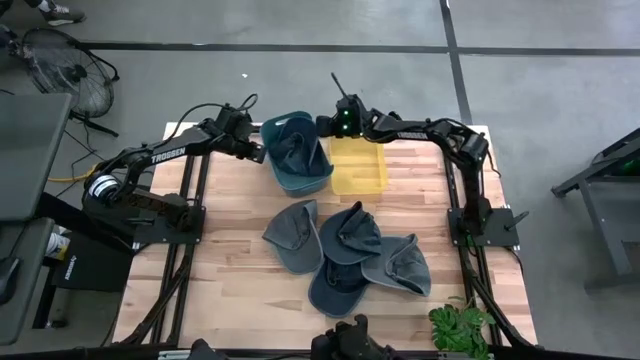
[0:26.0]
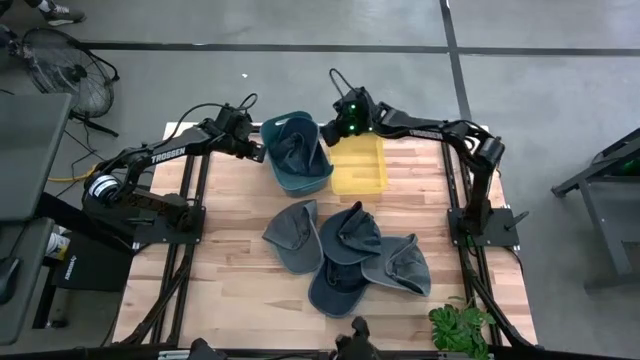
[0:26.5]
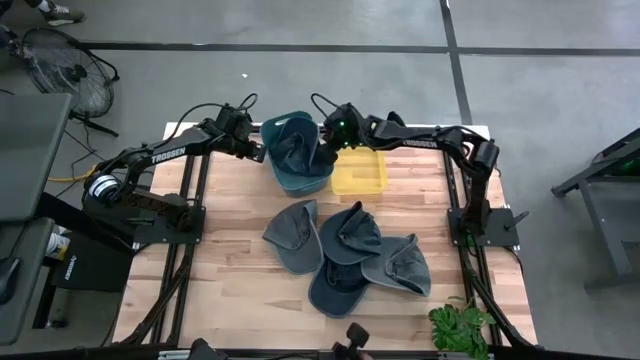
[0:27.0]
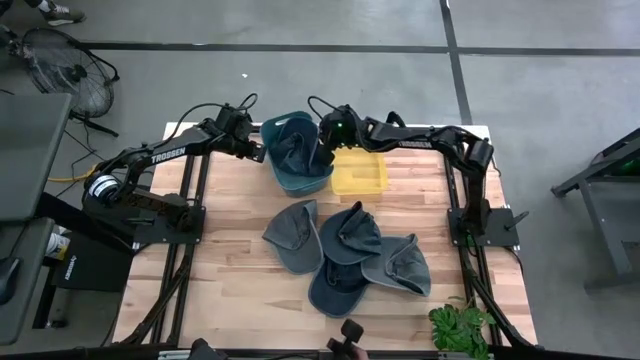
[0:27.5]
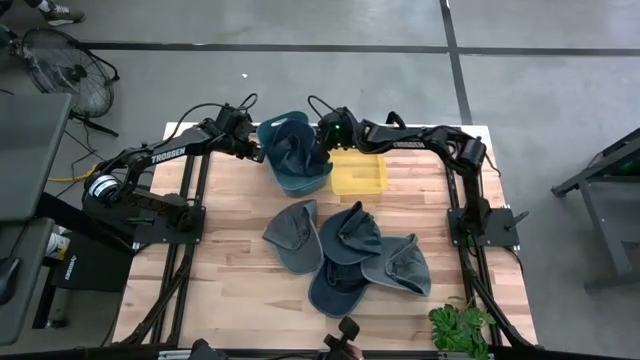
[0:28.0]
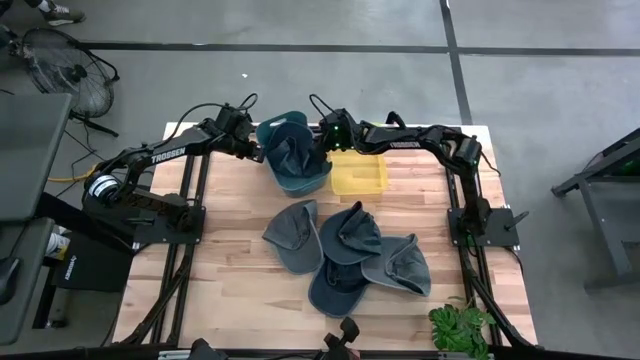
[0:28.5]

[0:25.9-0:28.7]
Task: Pick & Place hat
Adjust the blue cap in the blue bin

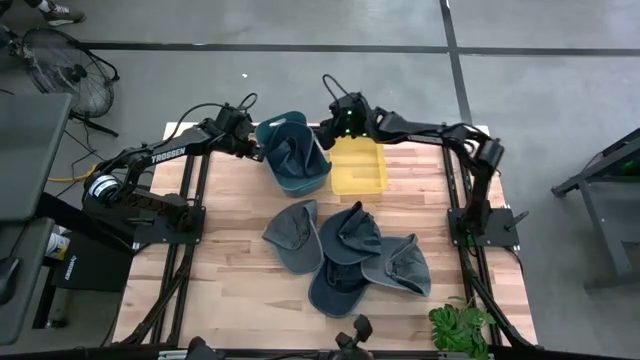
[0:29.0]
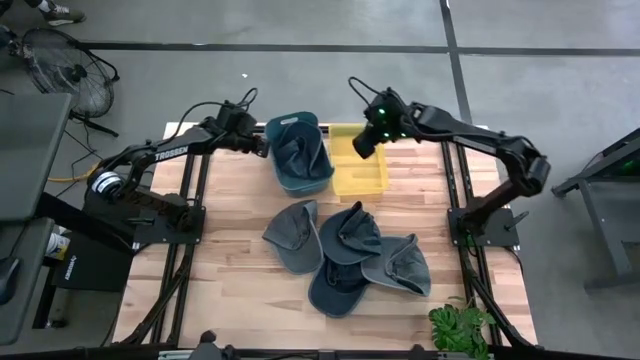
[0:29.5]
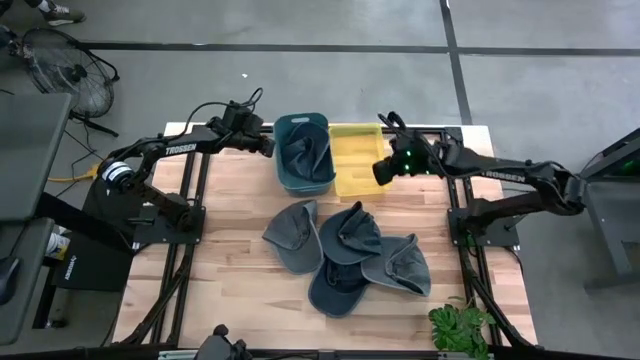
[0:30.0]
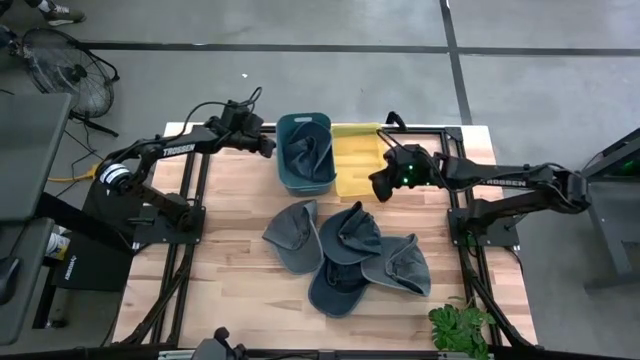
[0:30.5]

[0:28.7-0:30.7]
Adjust the blue bin on the table

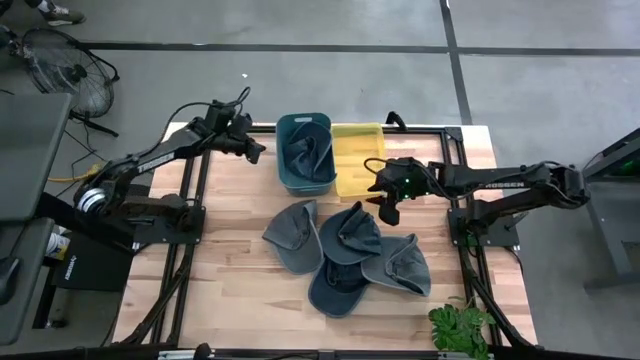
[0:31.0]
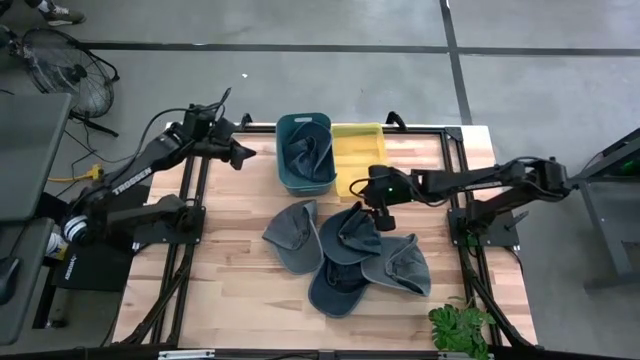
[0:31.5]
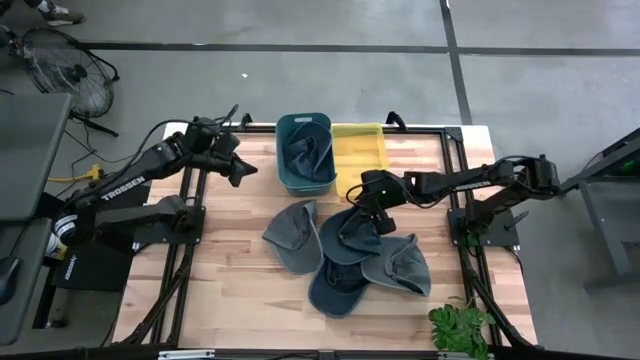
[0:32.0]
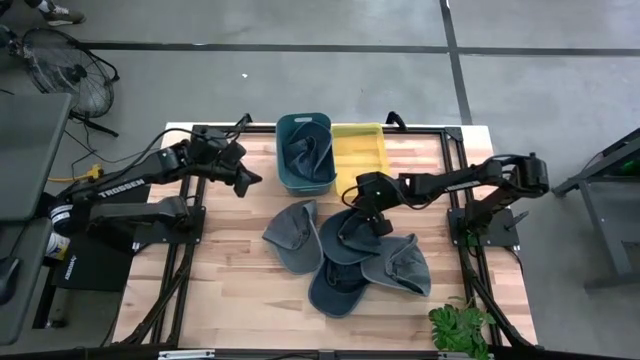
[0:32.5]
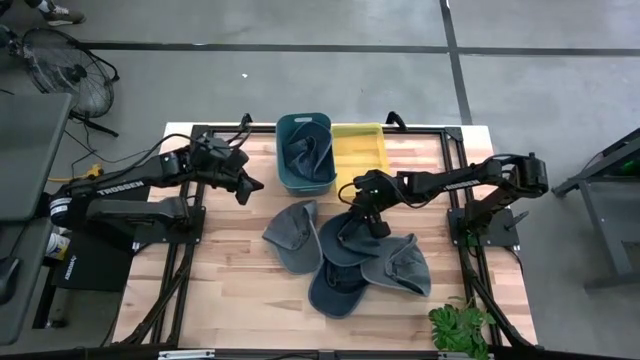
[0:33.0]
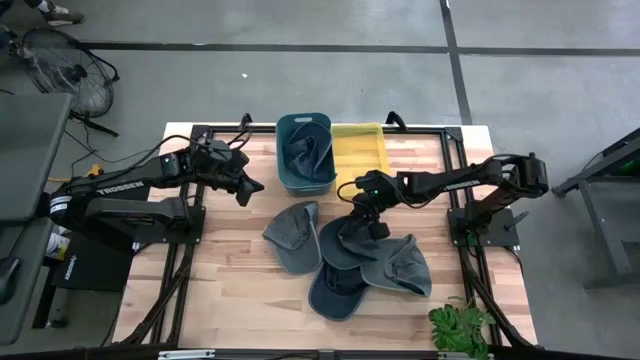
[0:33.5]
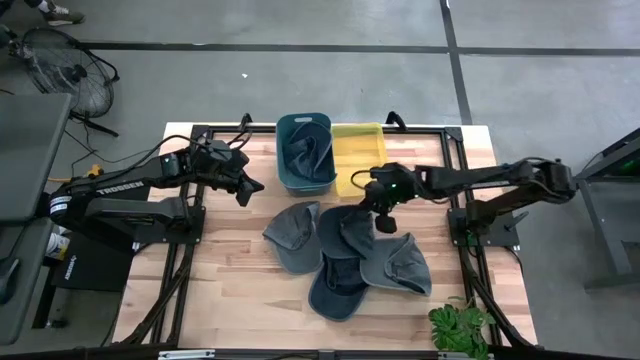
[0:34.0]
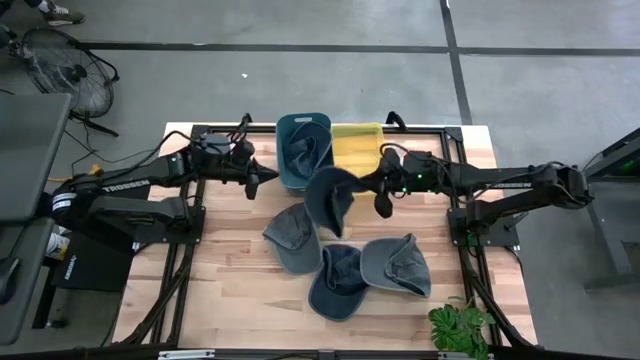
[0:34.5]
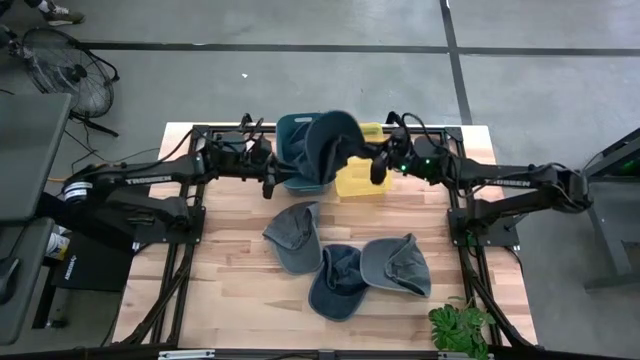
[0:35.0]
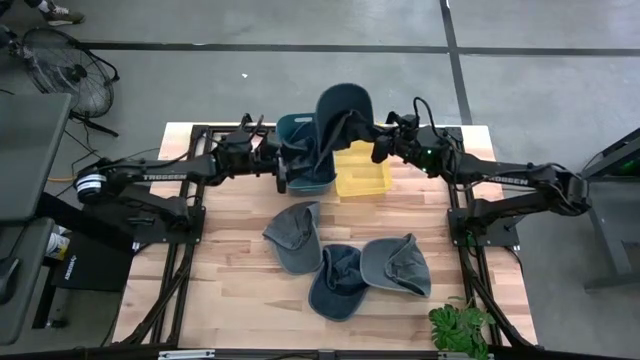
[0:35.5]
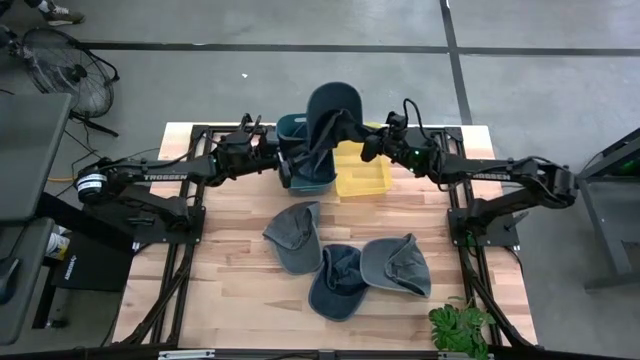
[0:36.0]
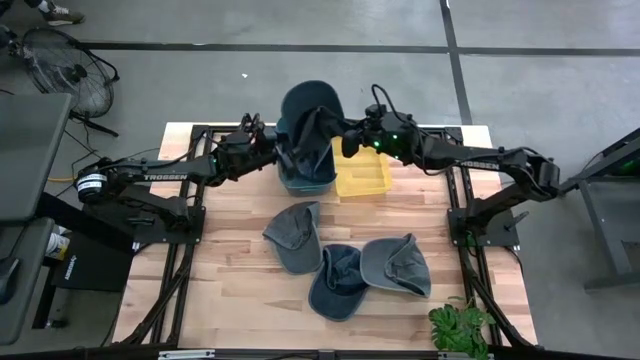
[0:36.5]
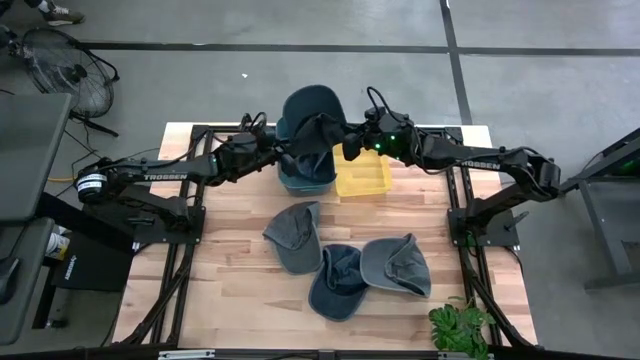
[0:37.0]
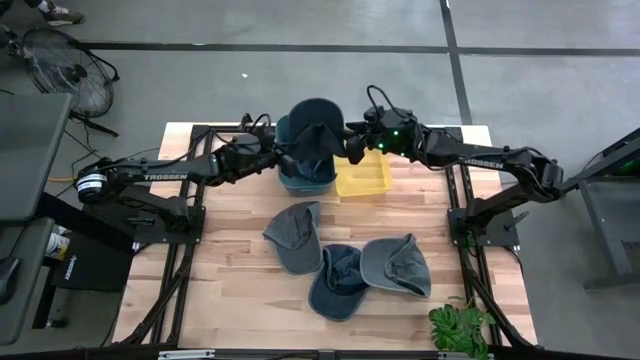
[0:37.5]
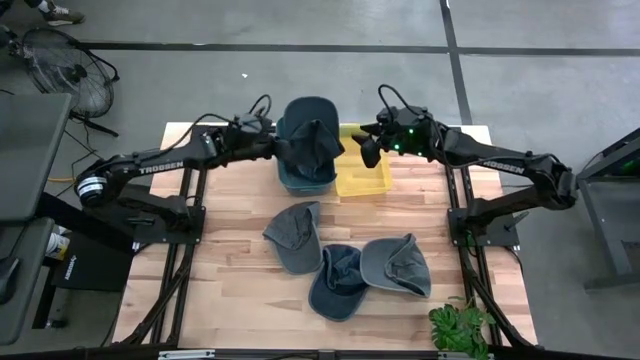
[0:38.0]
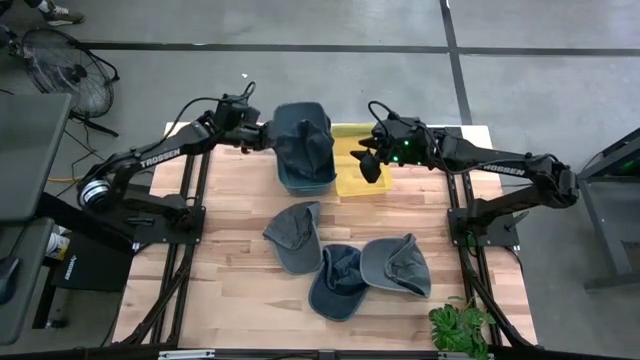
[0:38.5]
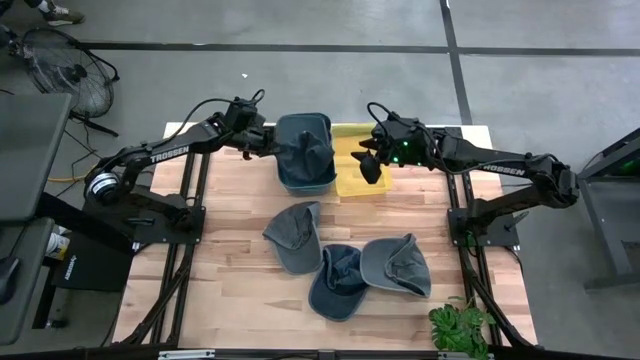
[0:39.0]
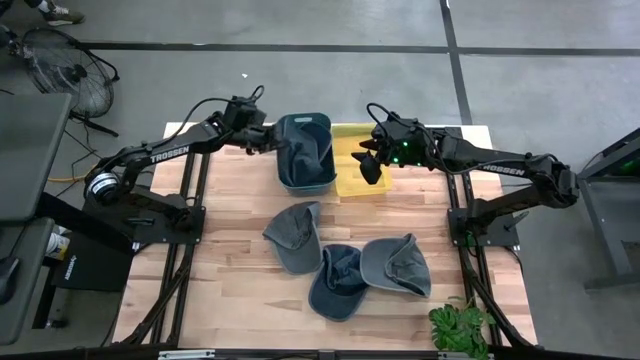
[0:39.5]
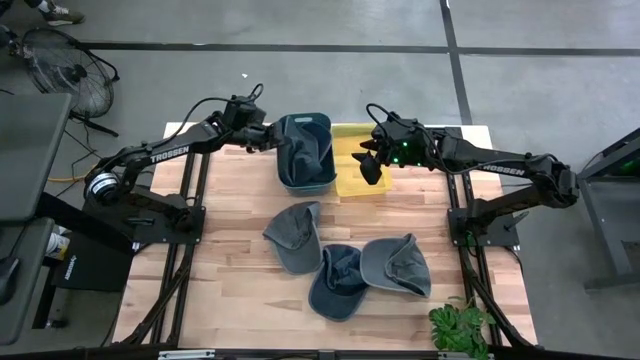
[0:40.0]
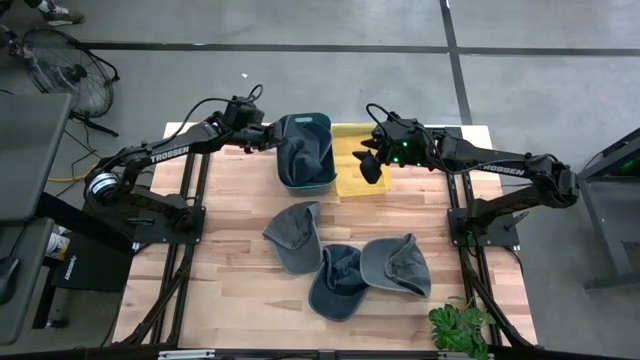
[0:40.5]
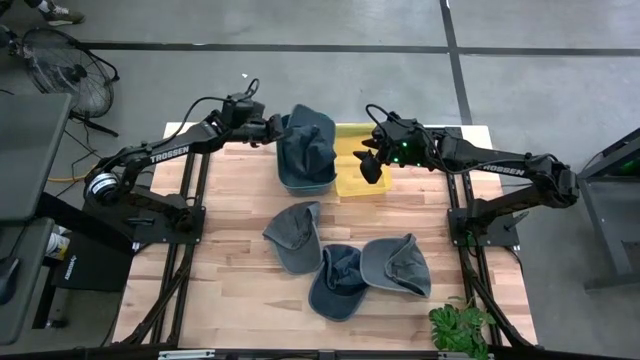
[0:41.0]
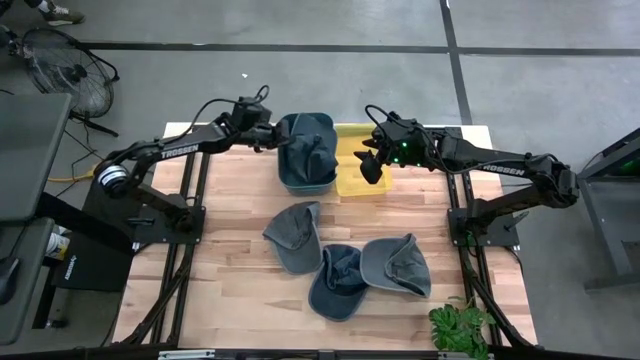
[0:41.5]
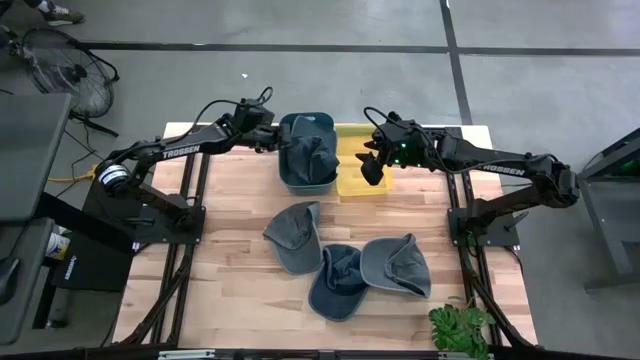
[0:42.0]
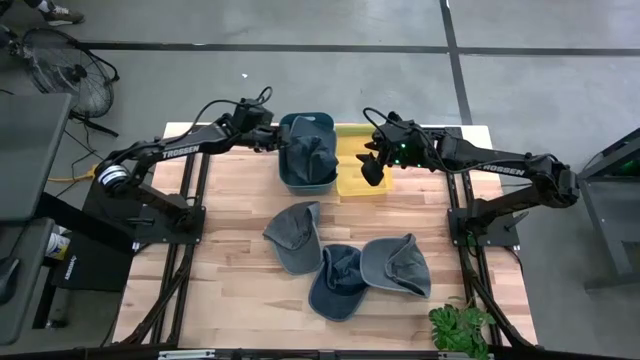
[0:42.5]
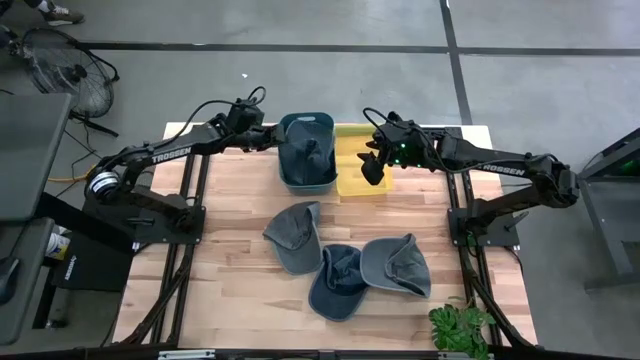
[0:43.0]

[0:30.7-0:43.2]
Put the top blue cap into the blue bin
